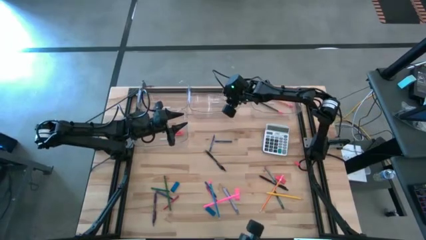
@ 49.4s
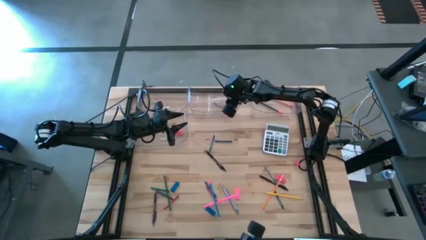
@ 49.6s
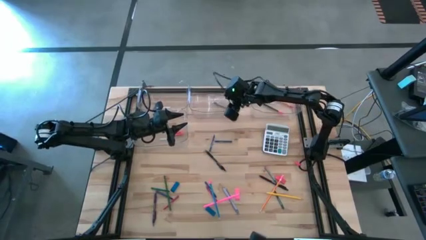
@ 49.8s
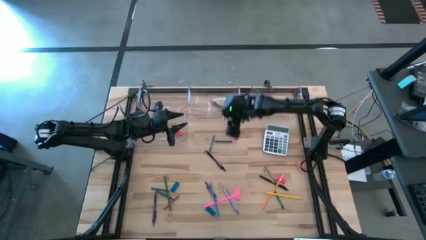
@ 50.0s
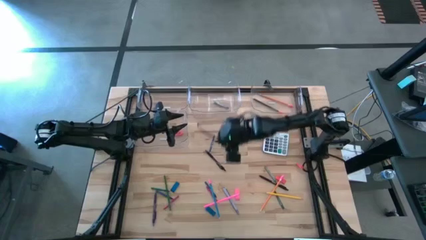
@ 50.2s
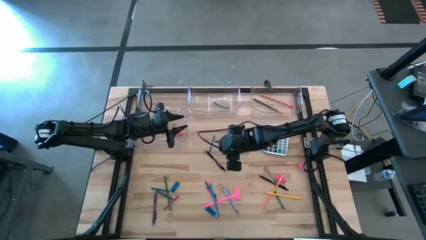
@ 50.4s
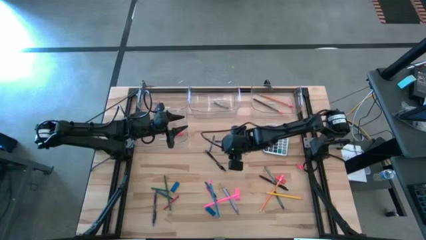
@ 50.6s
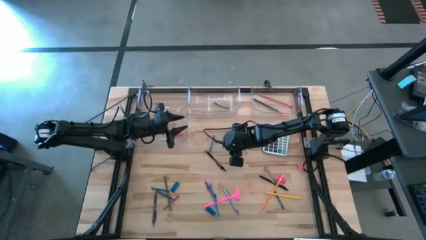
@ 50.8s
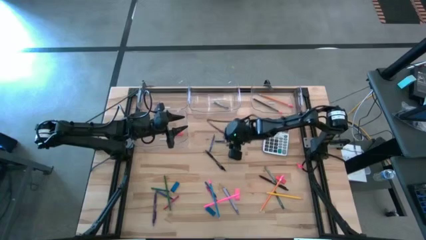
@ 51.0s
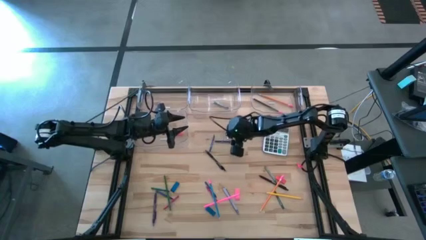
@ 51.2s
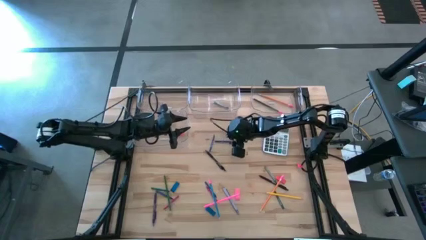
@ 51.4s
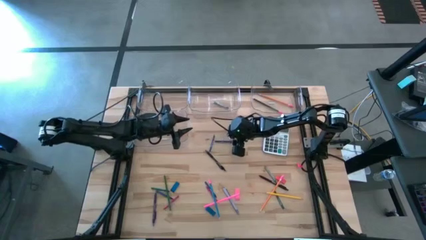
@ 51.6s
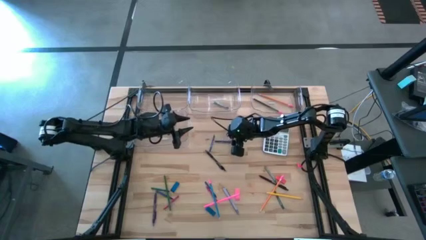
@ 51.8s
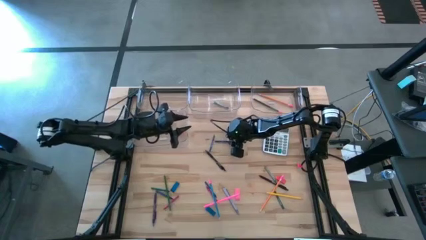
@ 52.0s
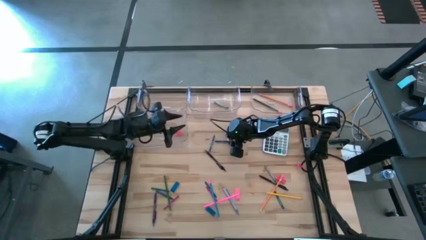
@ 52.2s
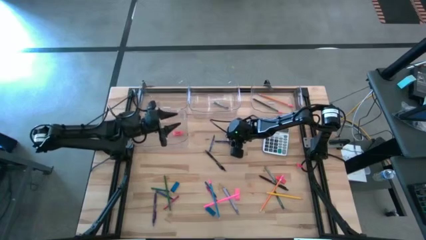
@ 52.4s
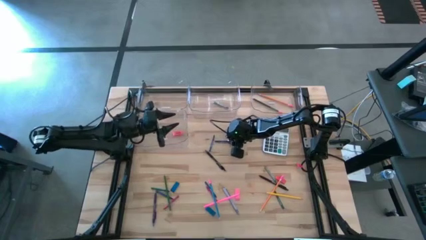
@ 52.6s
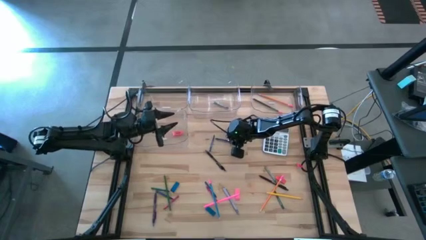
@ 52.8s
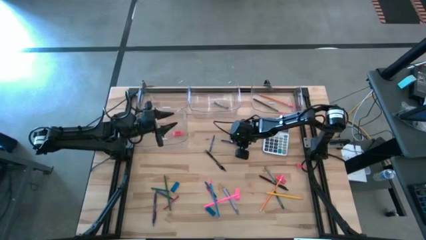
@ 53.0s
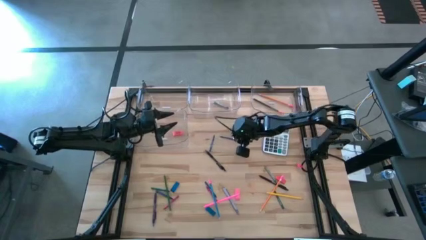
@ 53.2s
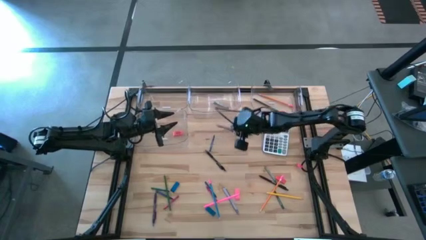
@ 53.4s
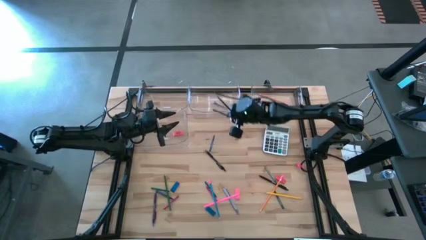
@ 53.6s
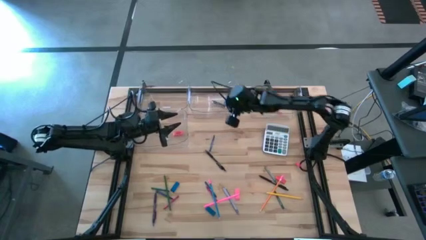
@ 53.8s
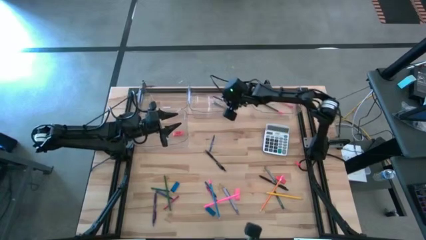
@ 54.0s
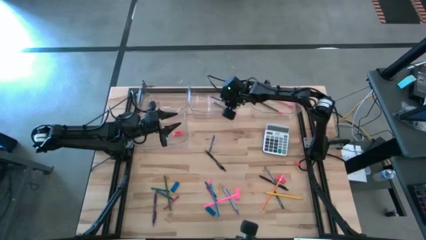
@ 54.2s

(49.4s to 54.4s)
Task: Sort crayons/erasers/pens/pencils in bins
Put the blue crayon into the top center transparent bin

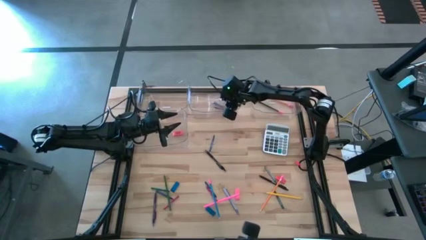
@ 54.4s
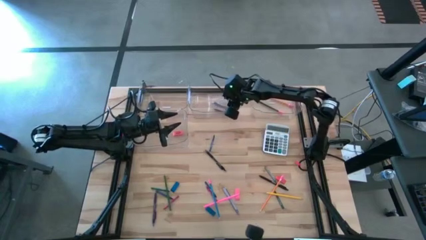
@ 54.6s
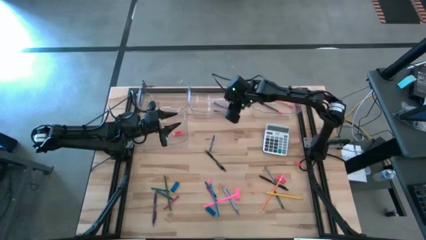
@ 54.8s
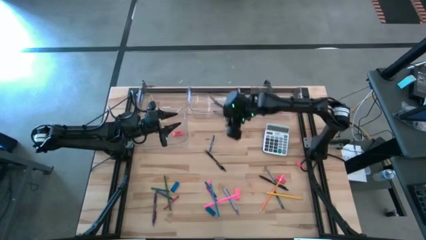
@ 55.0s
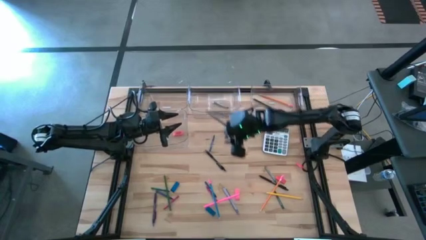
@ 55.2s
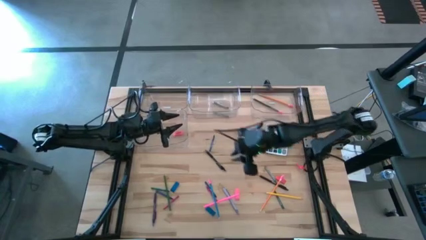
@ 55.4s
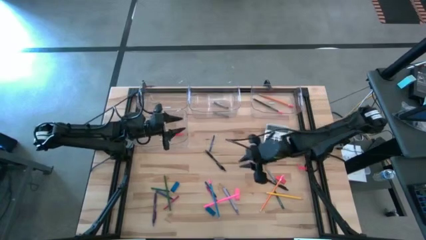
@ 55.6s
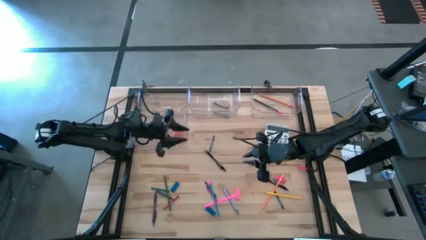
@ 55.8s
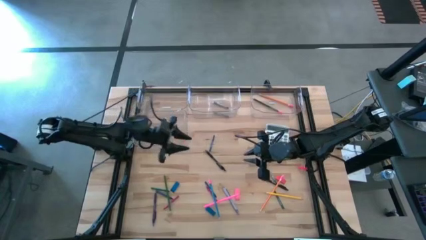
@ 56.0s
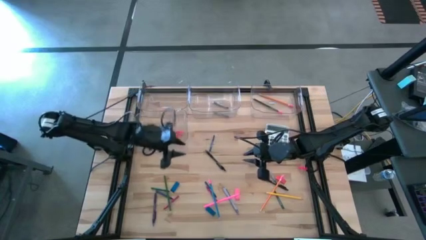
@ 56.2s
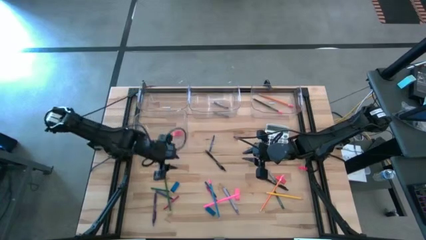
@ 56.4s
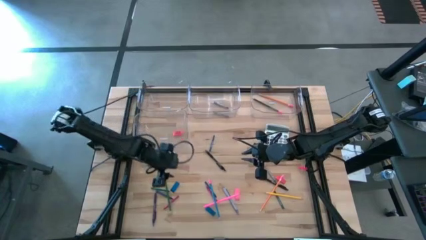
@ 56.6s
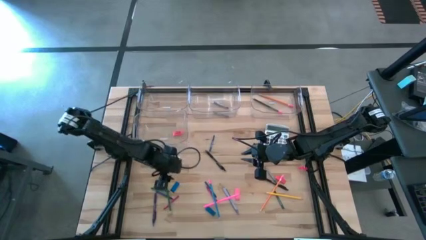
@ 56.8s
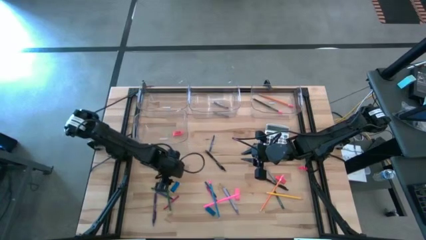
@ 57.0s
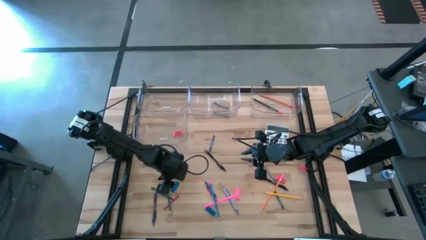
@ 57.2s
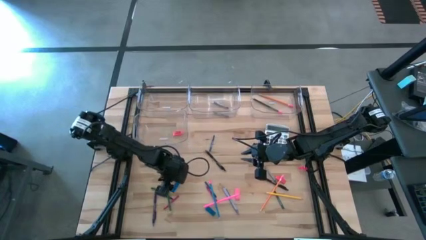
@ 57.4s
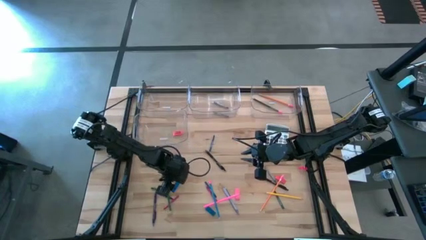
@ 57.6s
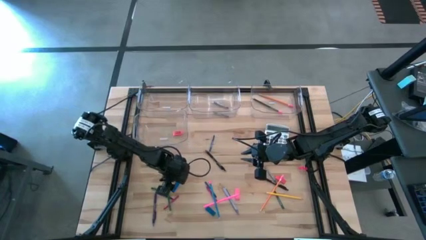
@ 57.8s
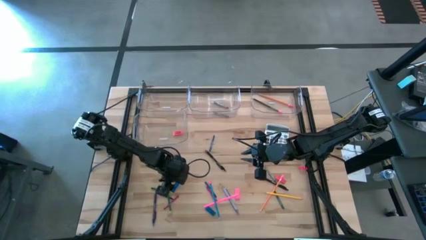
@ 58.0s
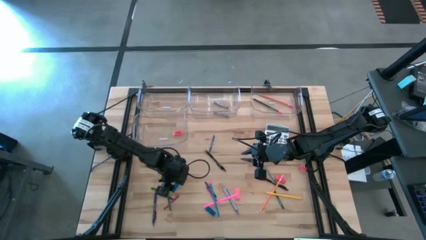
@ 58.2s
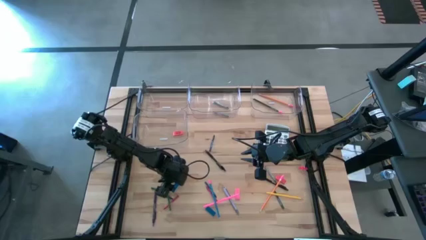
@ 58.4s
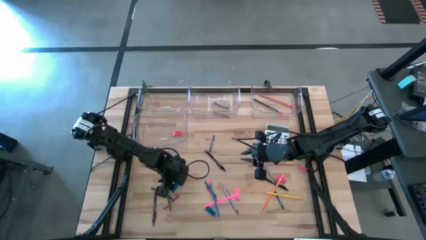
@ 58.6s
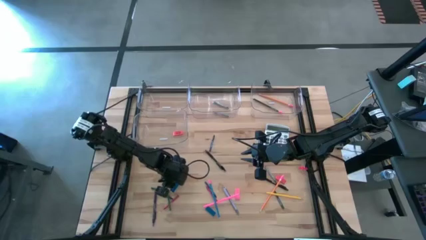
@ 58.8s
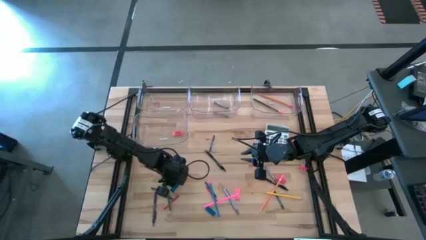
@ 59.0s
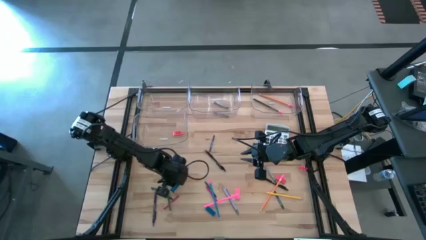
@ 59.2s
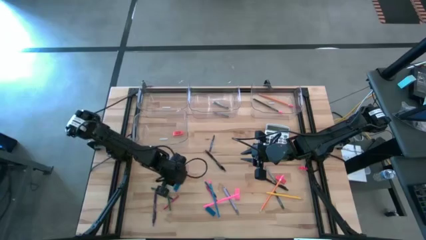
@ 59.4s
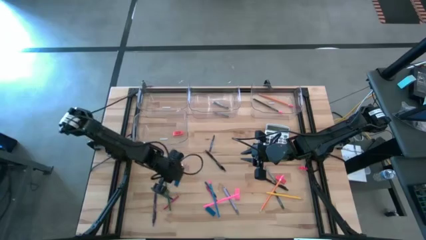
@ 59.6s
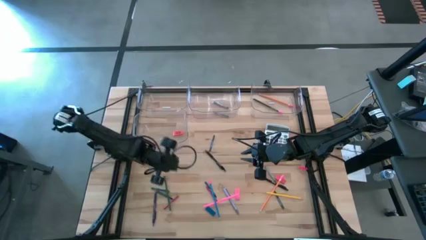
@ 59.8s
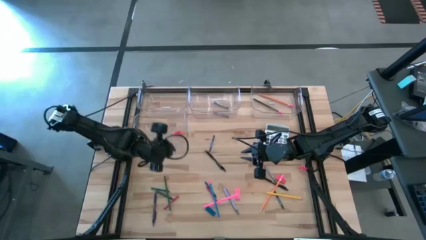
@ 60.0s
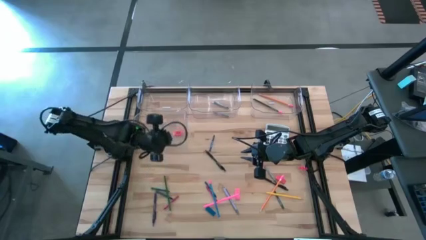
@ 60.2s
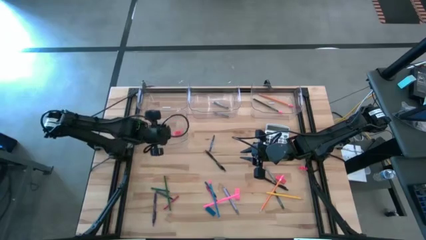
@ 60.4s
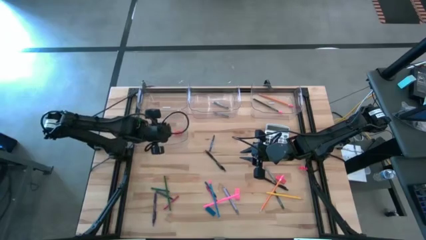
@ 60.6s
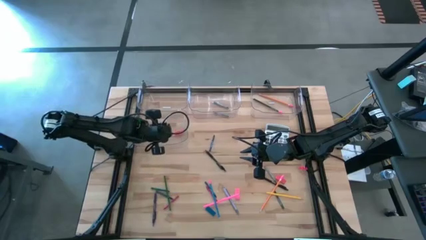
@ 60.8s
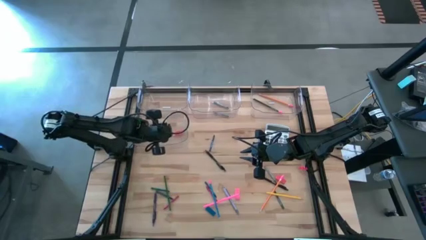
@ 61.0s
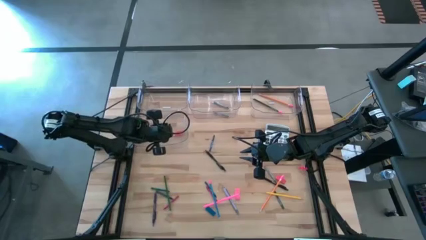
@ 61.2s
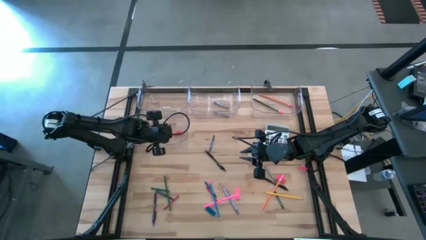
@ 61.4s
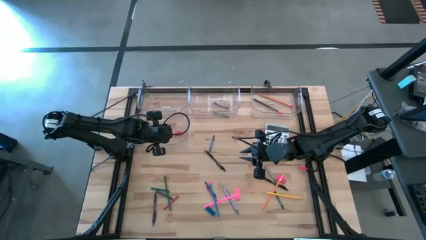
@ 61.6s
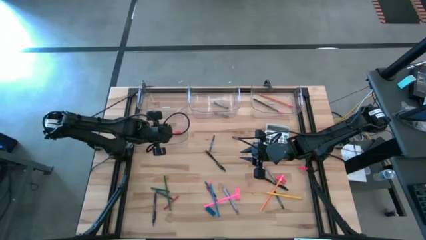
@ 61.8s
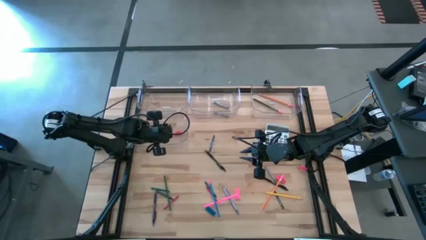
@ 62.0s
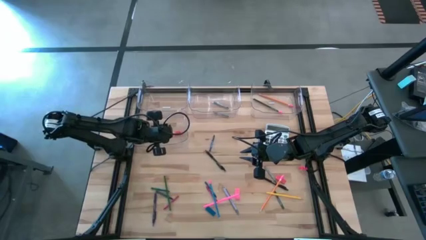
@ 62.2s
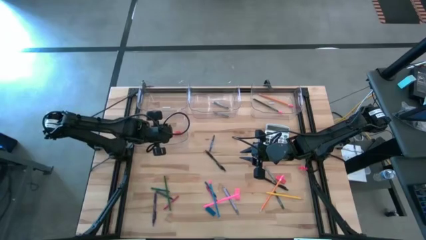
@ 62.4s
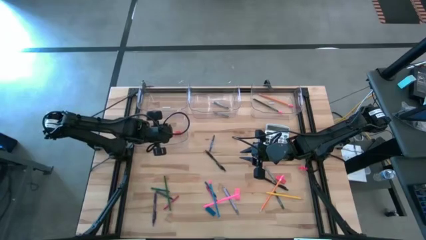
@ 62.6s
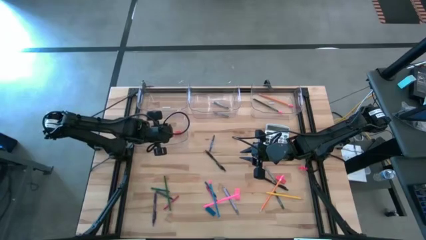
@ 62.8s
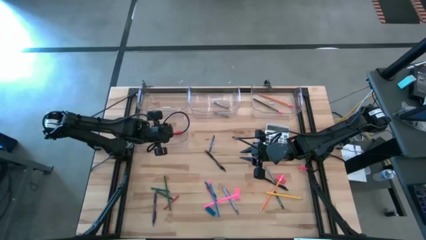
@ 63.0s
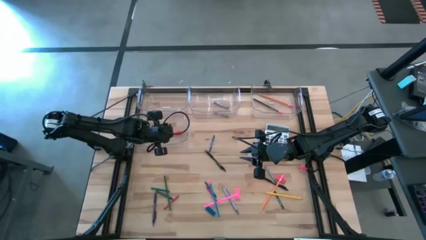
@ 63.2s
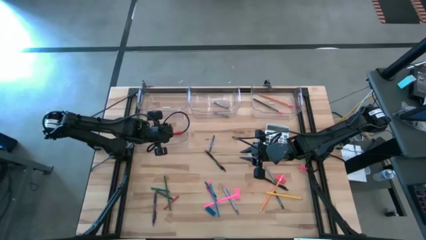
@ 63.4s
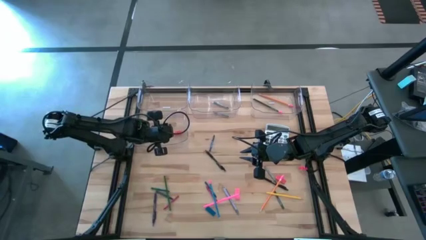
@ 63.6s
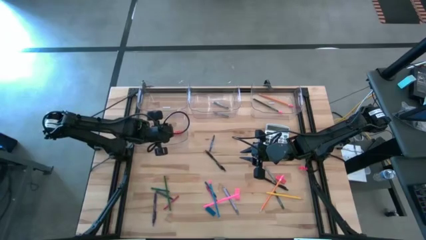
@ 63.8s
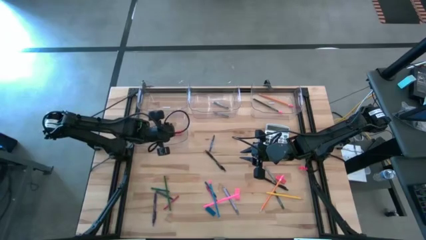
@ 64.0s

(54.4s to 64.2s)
Put the blue eraser into the bottom transparent bin

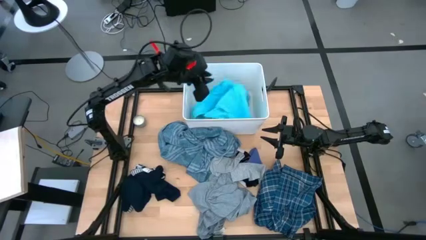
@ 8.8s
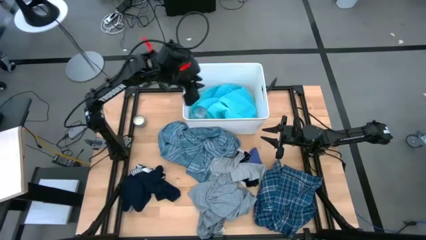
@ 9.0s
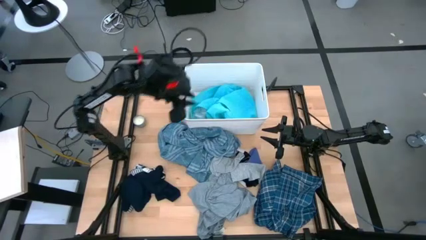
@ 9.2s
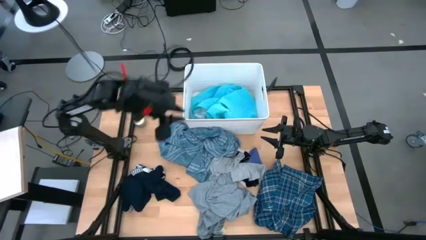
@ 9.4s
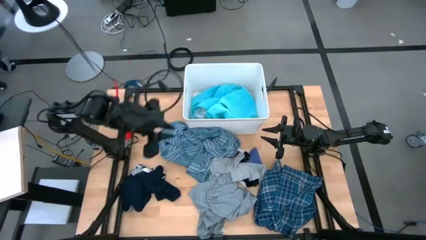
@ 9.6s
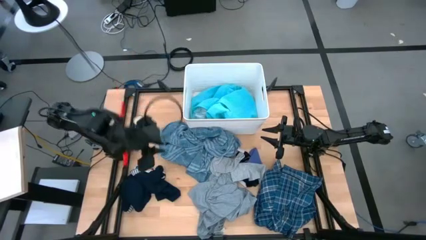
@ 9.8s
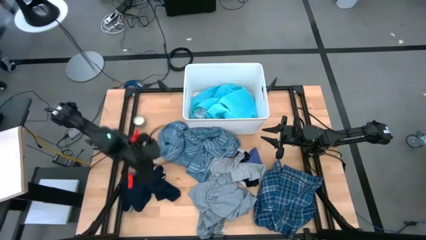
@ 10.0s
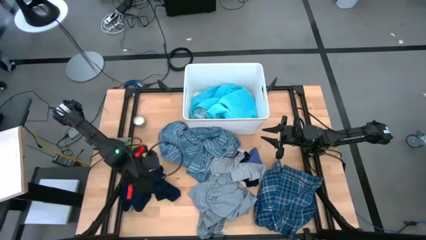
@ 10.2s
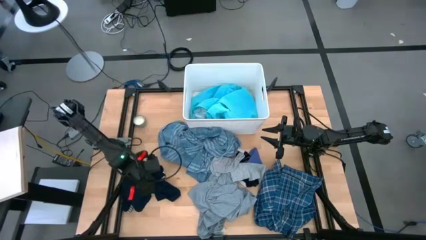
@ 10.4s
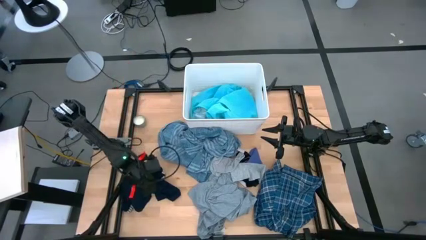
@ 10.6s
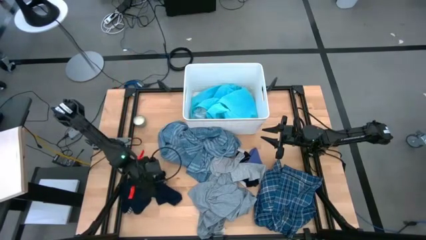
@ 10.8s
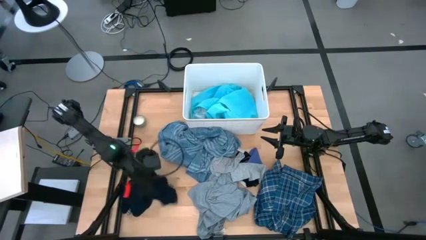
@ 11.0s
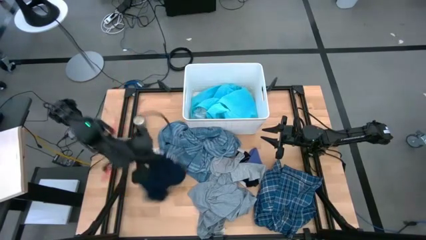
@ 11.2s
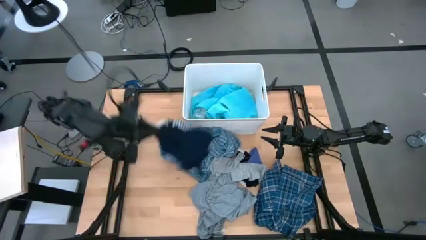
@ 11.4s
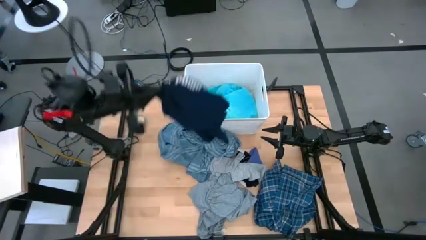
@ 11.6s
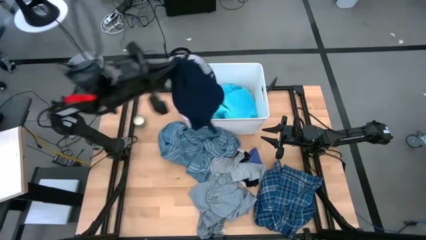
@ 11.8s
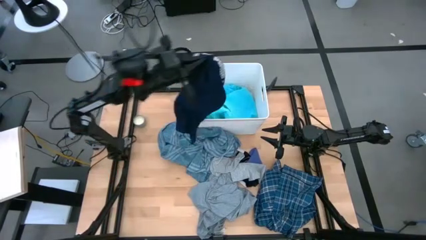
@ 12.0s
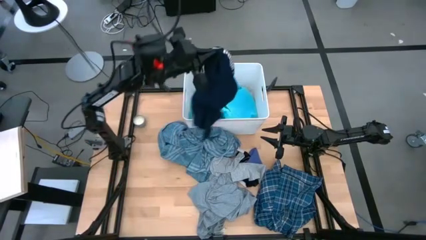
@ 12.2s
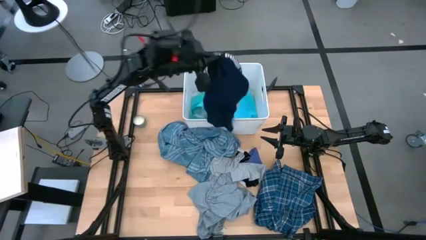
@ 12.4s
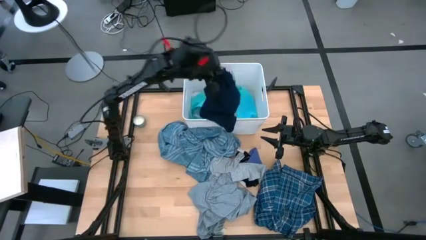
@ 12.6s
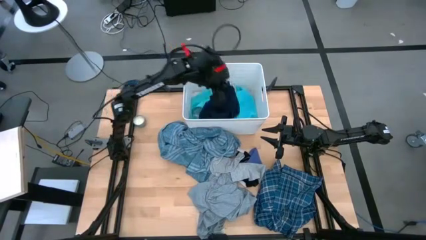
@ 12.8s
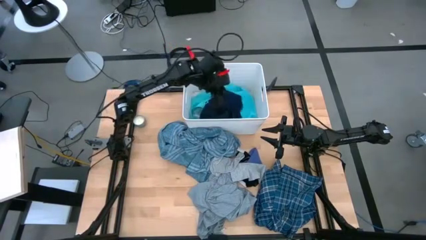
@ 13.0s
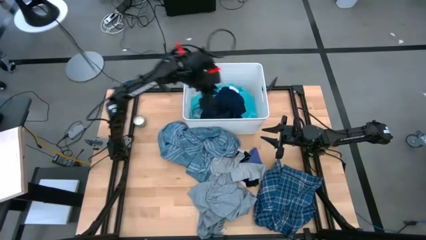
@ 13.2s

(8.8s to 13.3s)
Task: Sort clothes
Put the dark blue boxer shorts into the white laundry organizer
